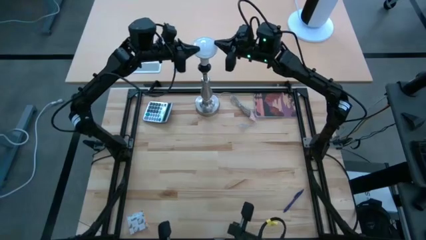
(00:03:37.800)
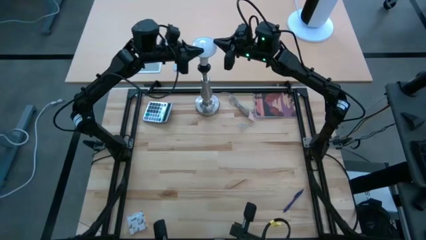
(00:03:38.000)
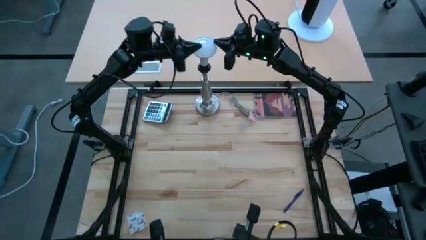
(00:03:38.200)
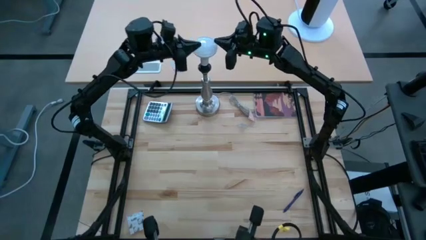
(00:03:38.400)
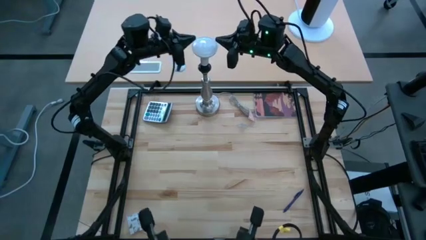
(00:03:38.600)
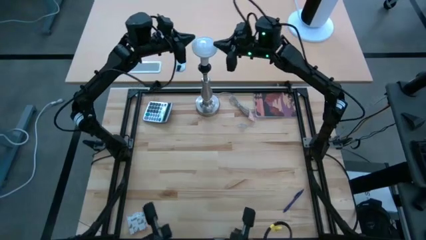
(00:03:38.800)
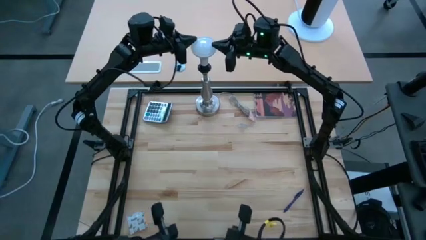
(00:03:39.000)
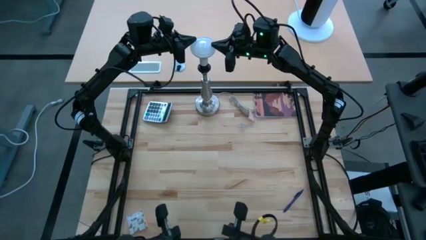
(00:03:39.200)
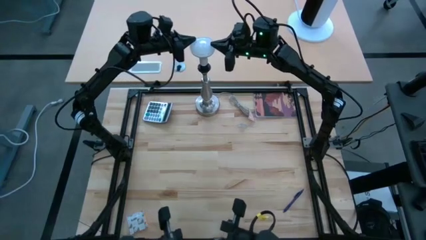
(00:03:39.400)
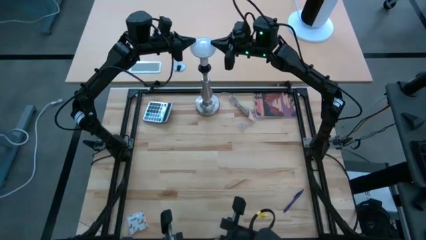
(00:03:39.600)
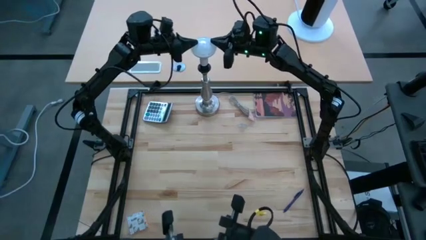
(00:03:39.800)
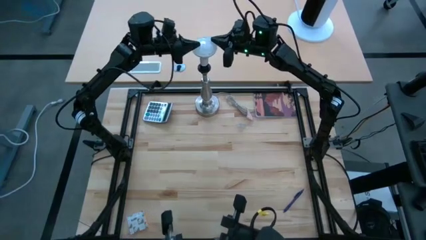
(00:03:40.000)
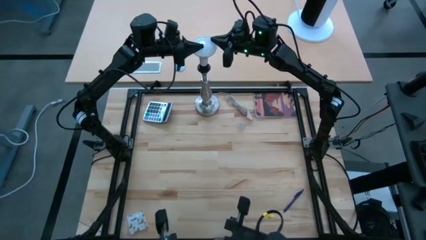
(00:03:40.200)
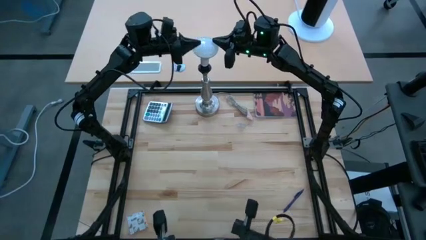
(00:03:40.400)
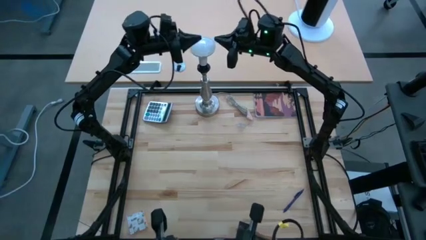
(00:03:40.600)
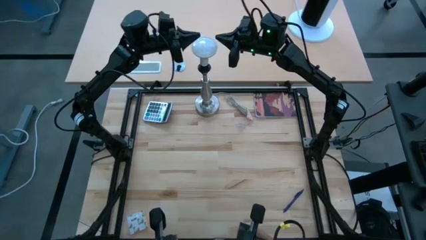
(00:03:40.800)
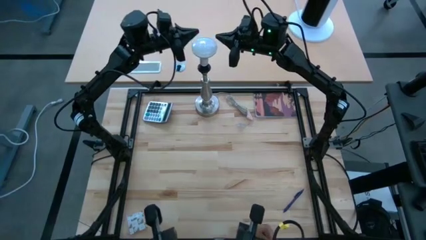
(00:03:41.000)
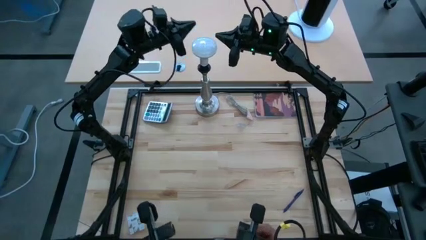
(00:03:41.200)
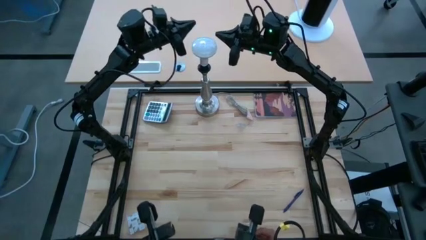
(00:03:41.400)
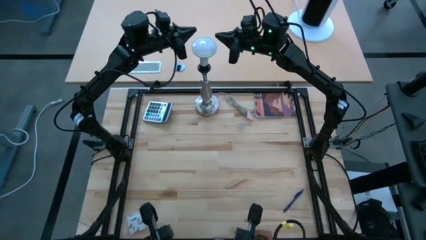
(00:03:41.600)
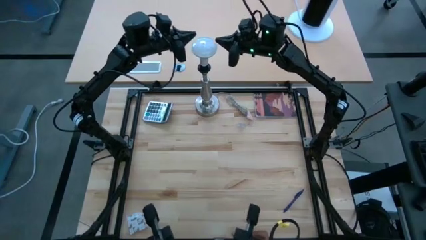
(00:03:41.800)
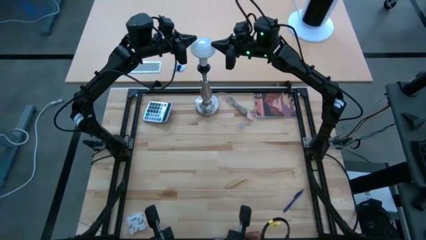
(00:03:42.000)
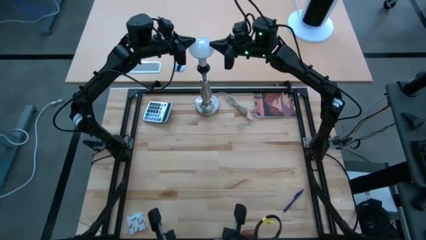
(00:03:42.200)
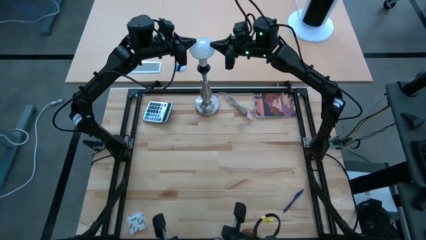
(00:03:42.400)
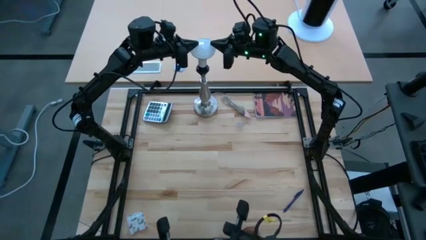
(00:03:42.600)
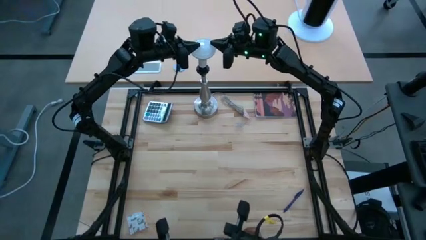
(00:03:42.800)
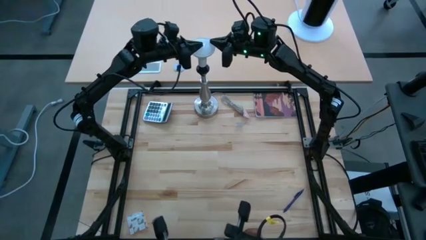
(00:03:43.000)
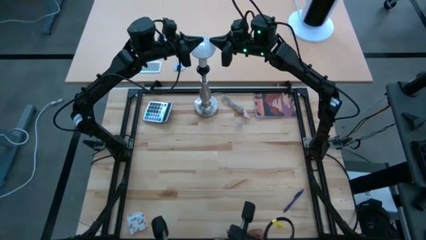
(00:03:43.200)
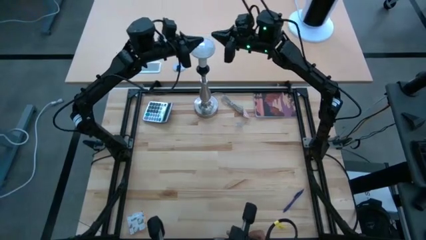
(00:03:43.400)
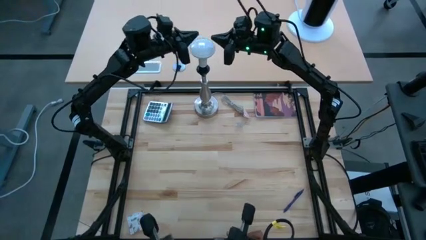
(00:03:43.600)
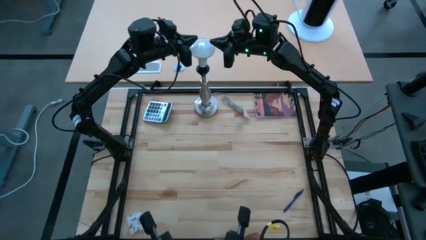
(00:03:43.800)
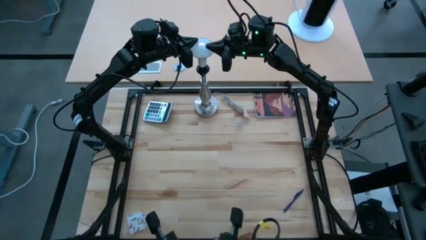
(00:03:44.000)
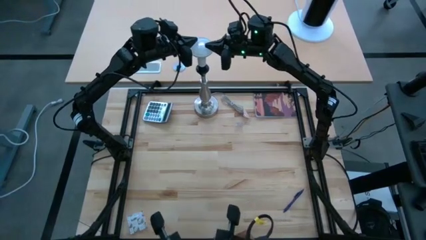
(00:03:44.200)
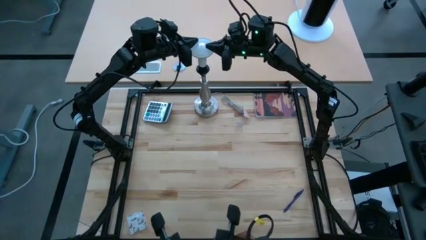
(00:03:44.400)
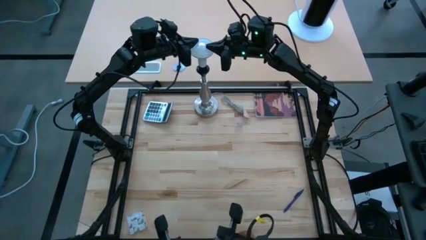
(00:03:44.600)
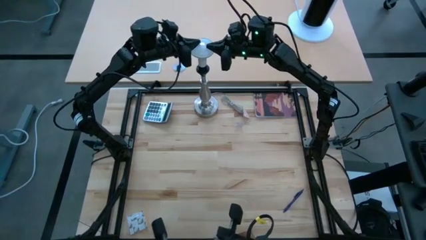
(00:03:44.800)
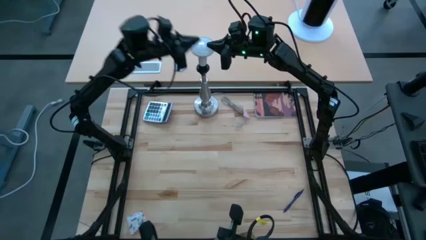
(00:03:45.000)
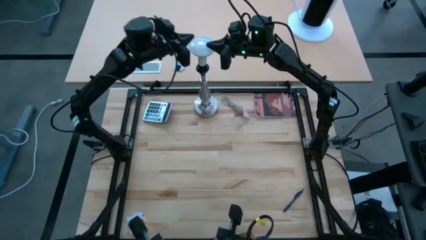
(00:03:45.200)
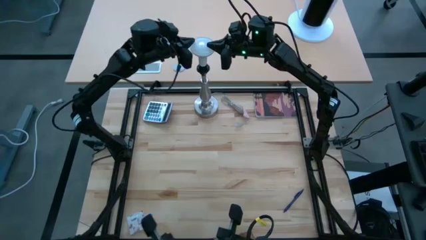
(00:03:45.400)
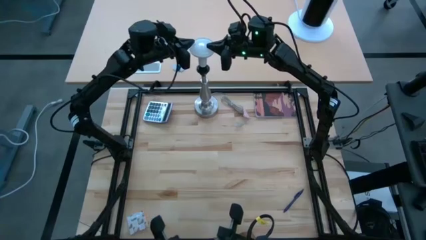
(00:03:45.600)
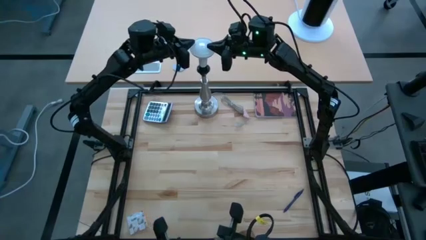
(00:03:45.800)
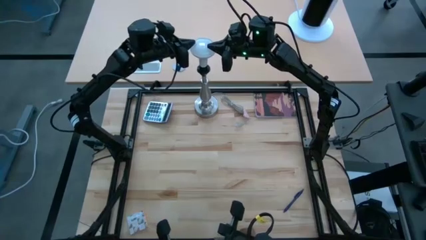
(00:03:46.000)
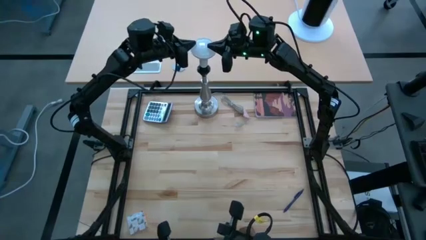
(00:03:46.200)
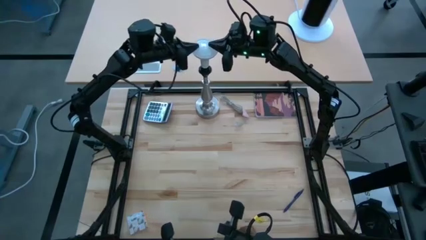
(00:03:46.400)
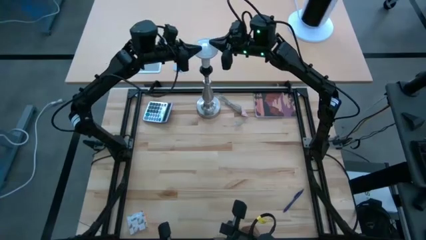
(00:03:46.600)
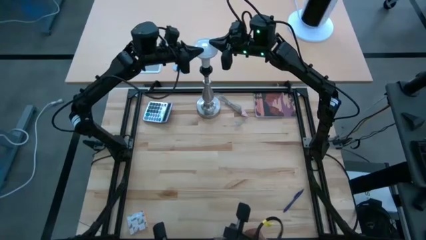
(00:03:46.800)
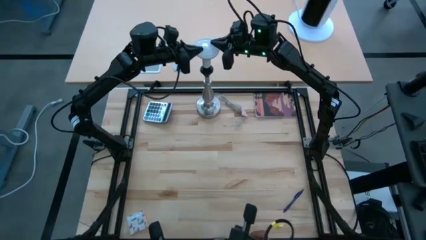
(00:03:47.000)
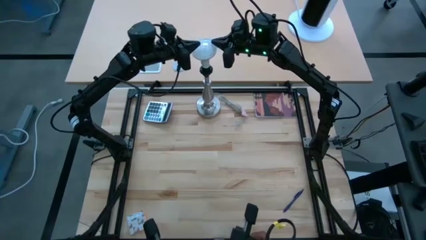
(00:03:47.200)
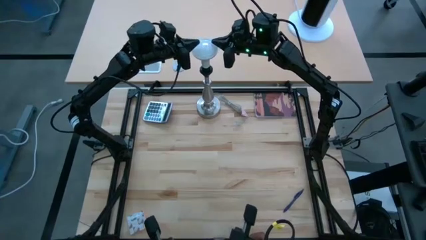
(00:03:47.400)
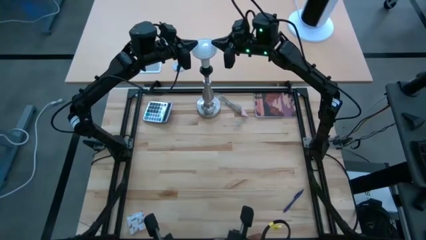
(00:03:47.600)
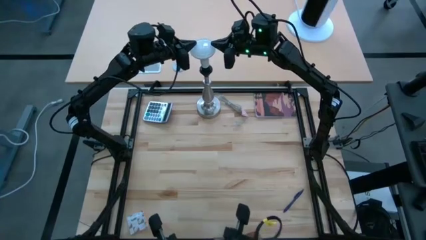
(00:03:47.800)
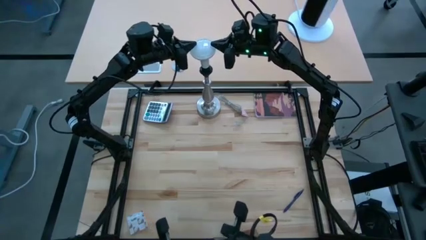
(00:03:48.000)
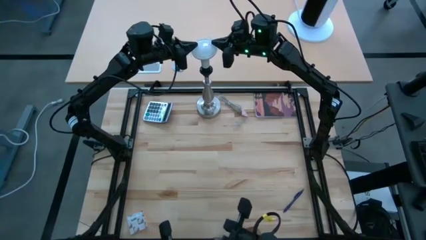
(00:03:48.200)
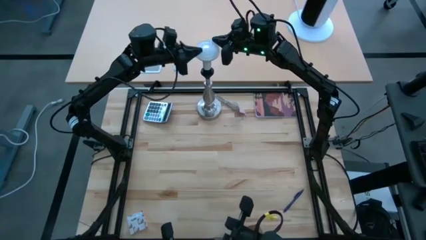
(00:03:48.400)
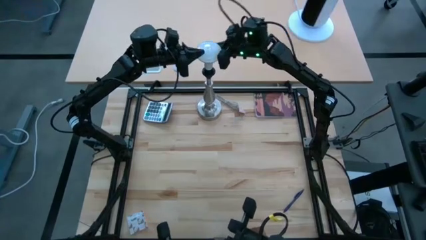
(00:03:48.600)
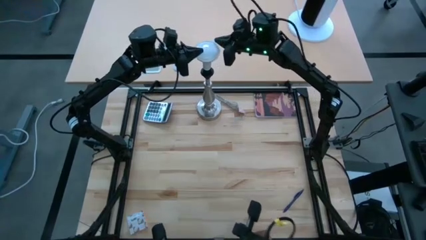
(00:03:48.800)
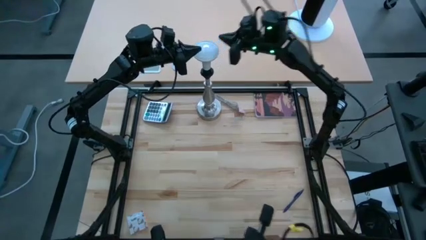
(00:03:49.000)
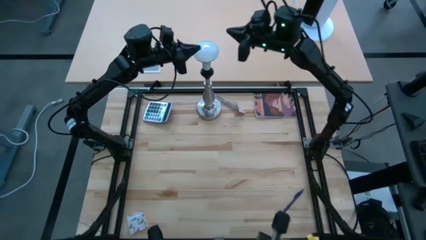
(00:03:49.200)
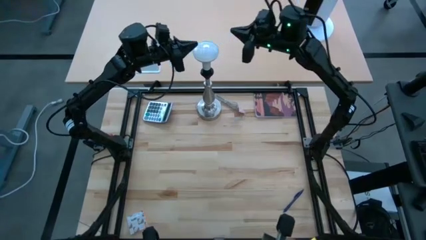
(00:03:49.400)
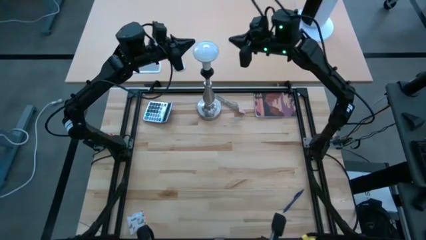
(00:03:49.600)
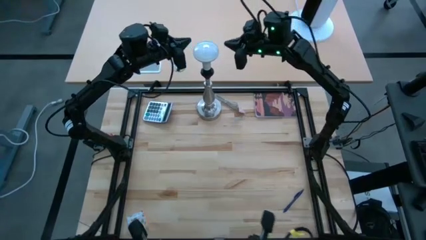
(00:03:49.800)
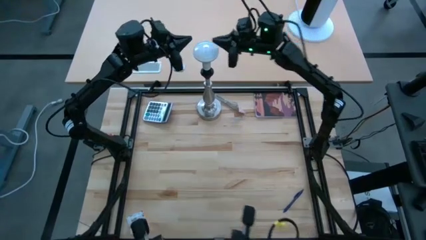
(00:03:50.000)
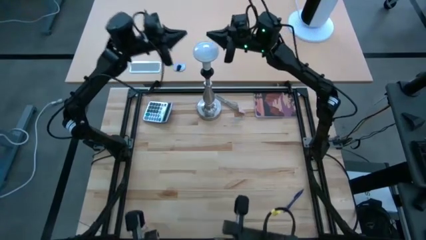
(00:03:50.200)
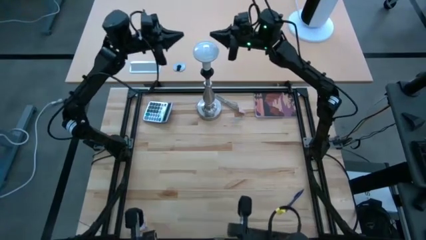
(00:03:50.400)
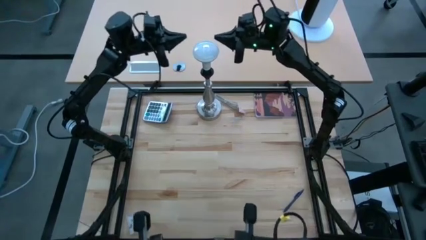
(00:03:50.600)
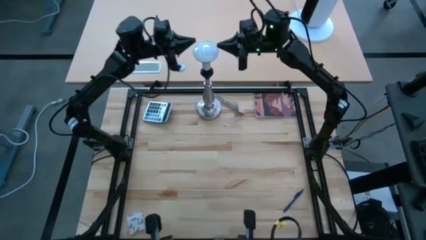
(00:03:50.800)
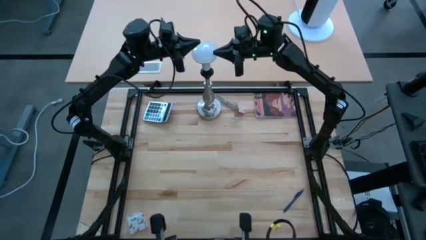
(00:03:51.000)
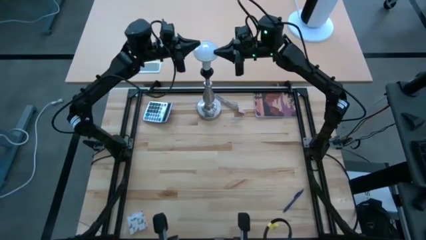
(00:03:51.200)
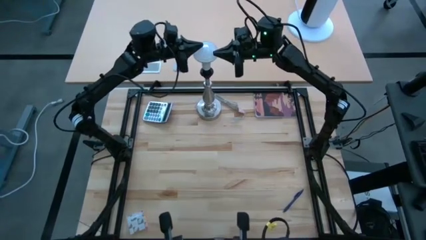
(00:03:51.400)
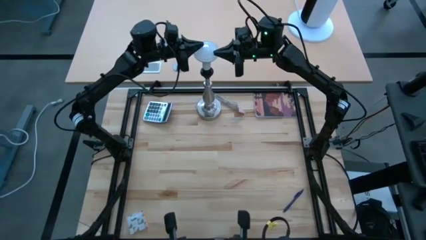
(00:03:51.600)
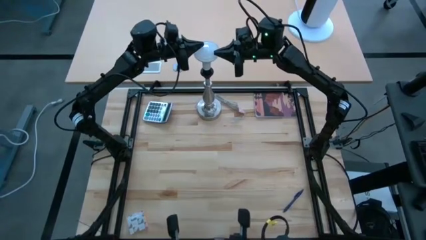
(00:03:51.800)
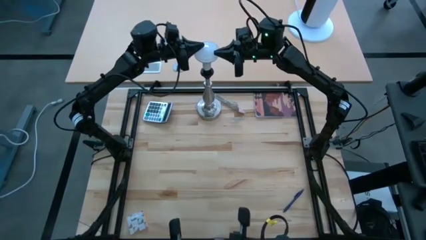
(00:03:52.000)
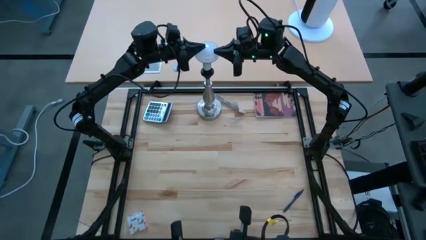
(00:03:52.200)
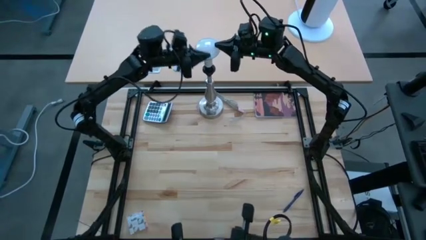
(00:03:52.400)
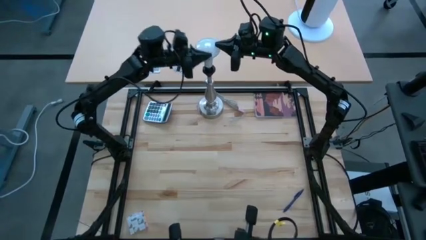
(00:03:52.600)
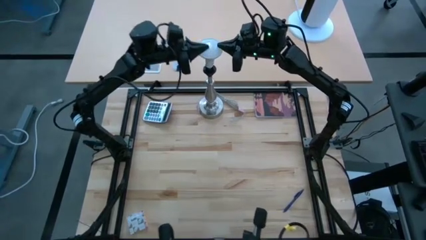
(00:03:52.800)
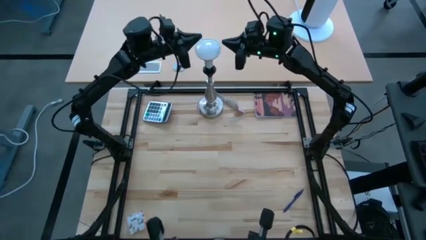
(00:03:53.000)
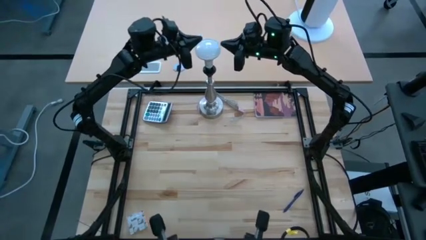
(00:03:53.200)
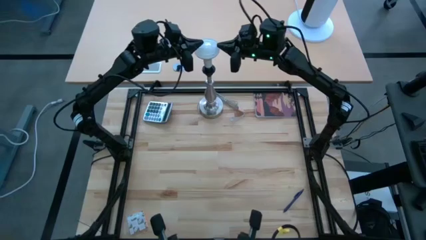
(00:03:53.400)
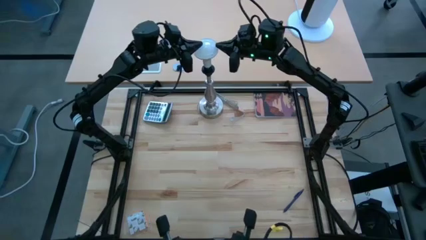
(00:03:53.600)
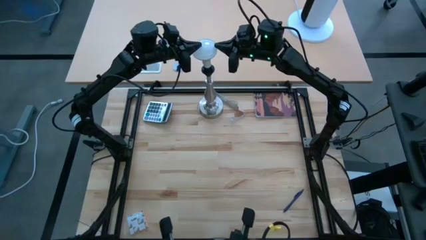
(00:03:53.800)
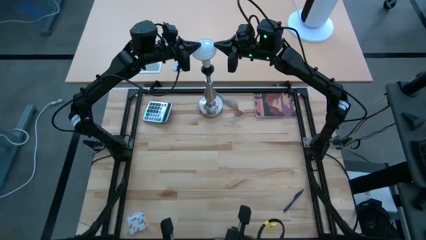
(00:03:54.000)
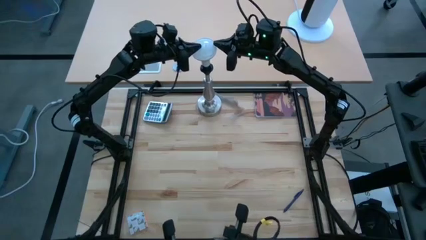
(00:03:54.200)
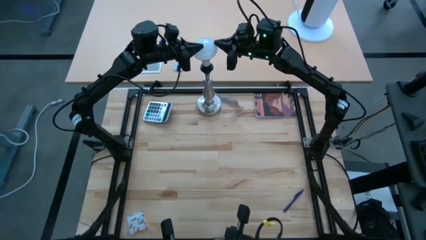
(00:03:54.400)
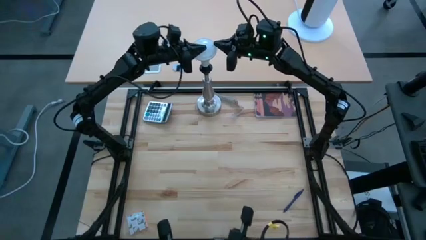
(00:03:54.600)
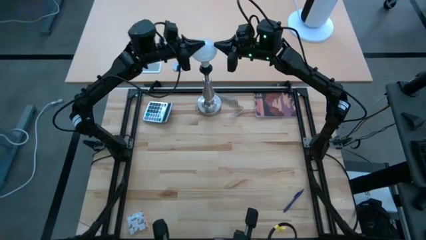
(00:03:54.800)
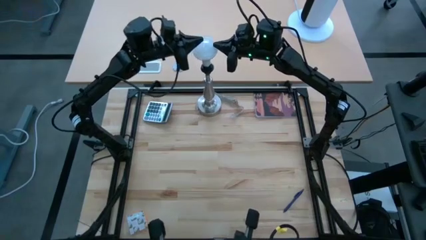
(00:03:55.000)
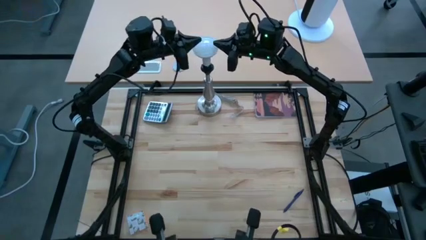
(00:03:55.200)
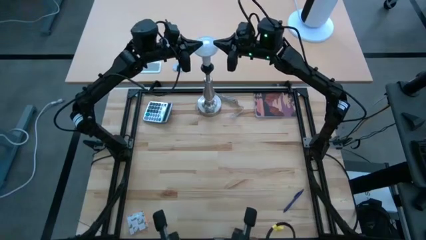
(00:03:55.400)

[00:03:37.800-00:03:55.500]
Task: Screw lightbulb
Remove the lightbulb from the table lamp
